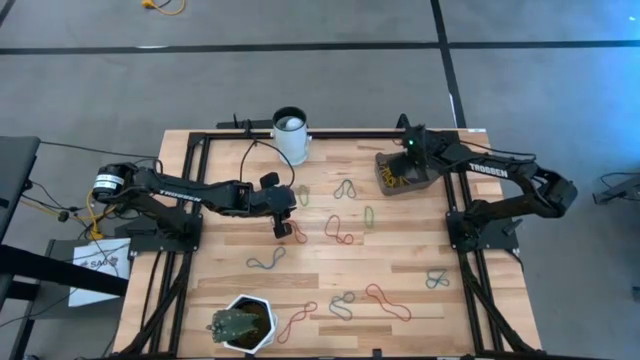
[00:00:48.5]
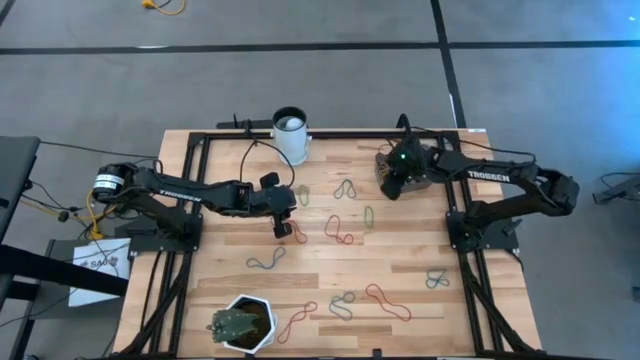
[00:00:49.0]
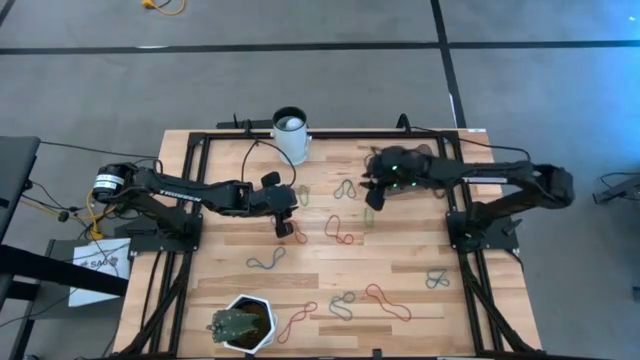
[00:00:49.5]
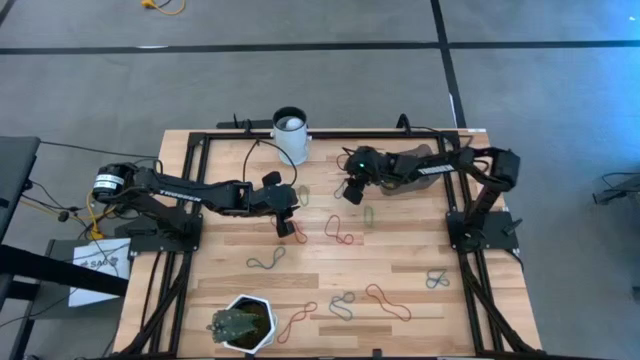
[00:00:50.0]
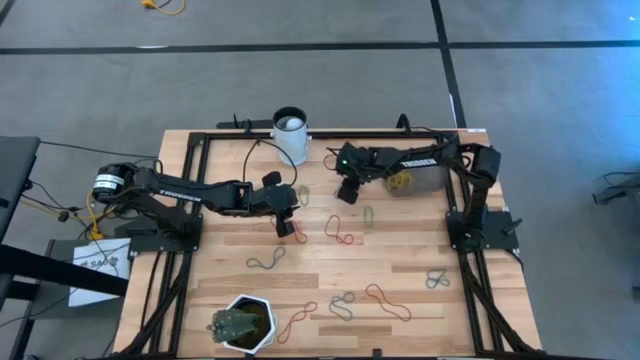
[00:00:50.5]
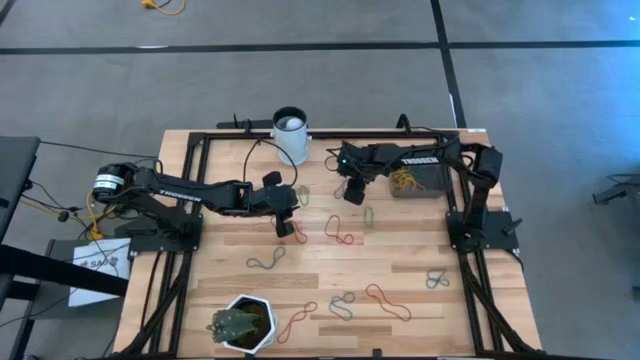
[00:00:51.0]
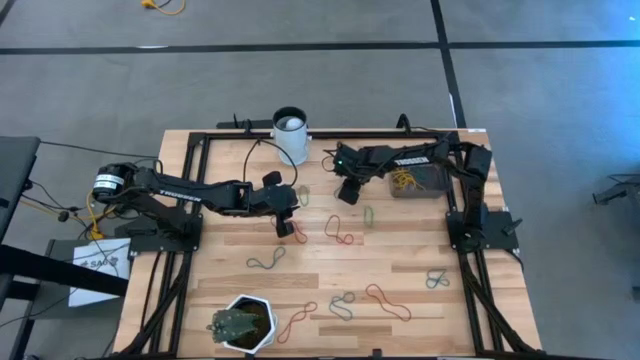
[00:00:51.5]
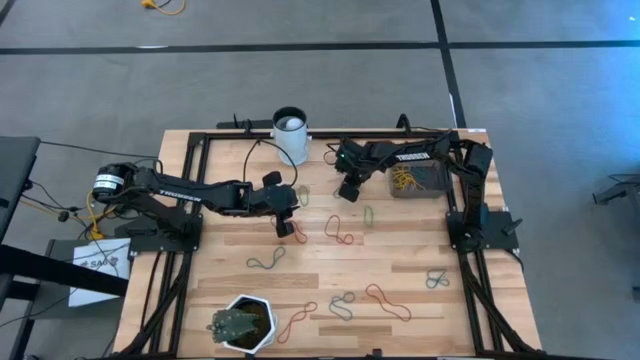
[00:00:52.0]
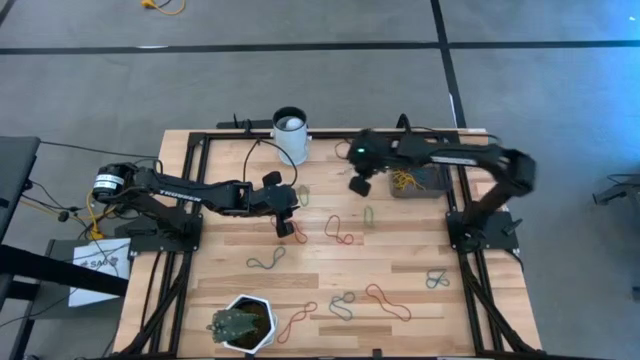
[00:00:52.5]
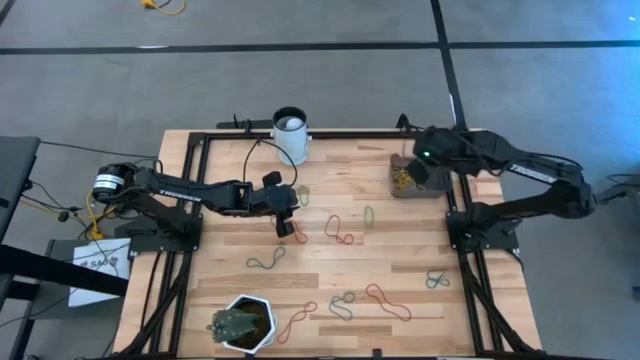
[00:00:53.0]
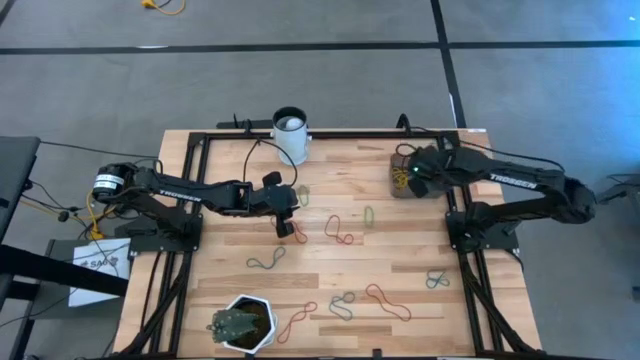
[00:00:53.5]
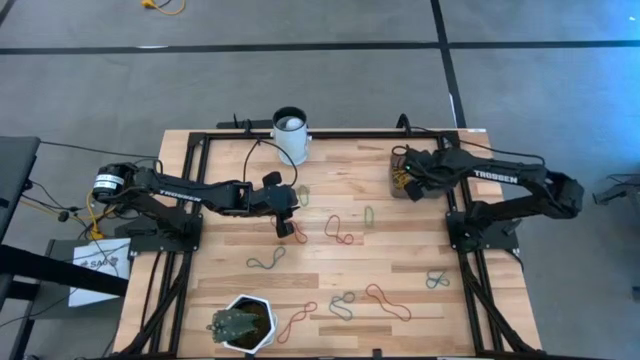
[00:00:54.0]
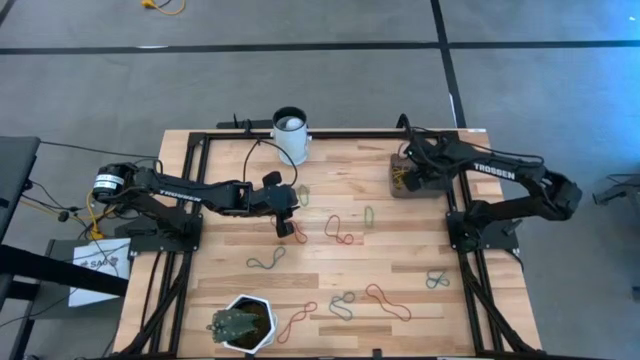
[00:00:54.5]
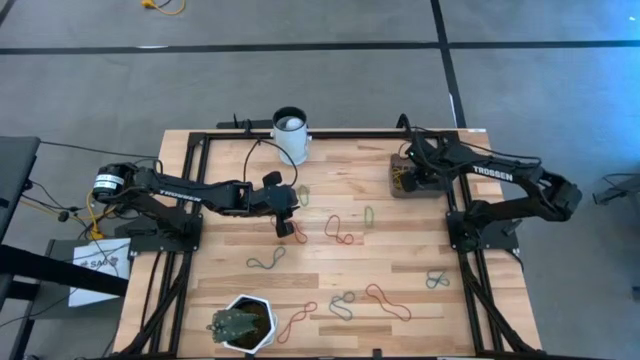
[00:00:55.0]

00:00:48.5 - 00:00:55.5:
Task: Pick and place items into bin
Put the blue rubber band into the bin

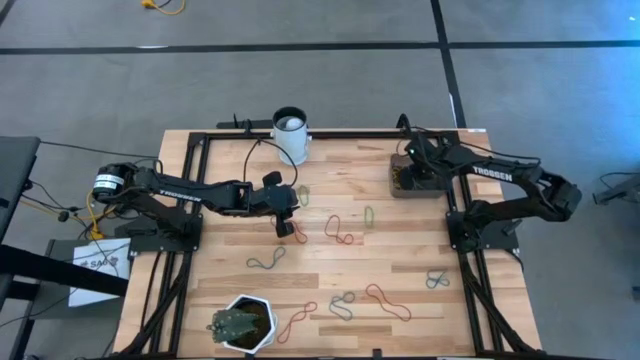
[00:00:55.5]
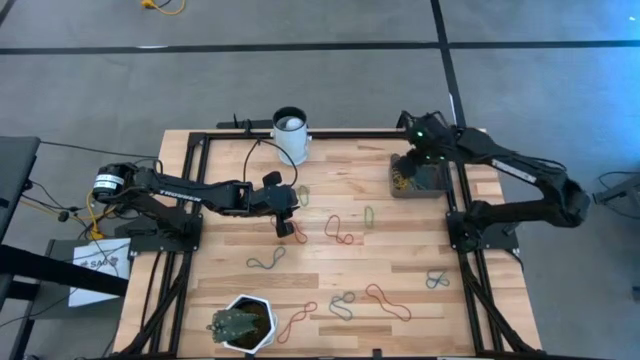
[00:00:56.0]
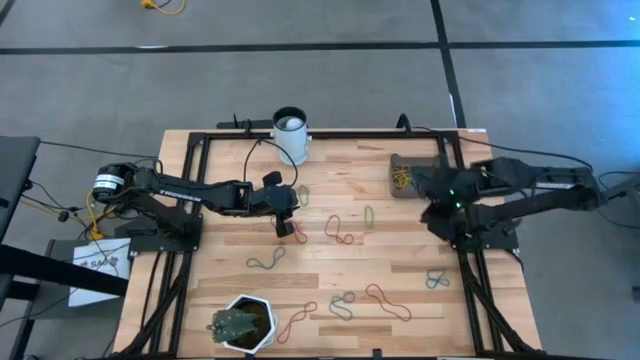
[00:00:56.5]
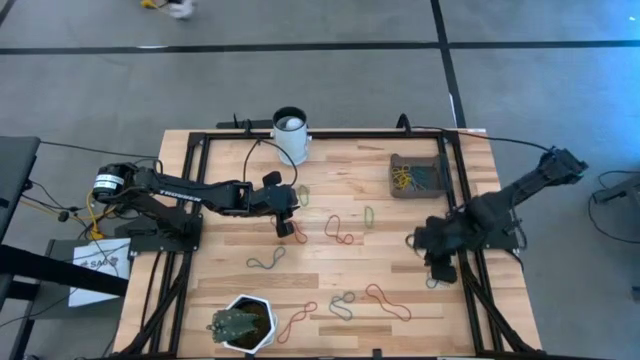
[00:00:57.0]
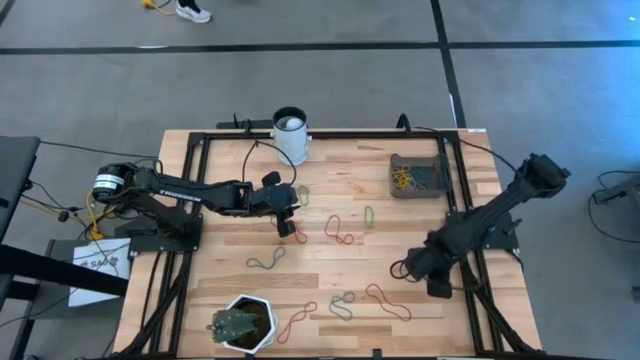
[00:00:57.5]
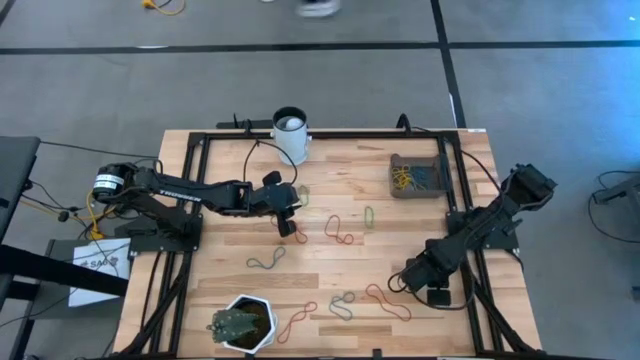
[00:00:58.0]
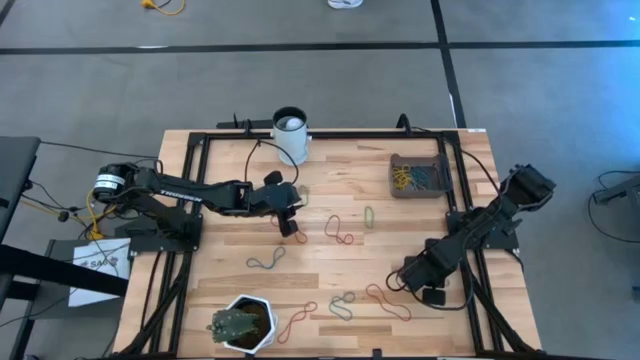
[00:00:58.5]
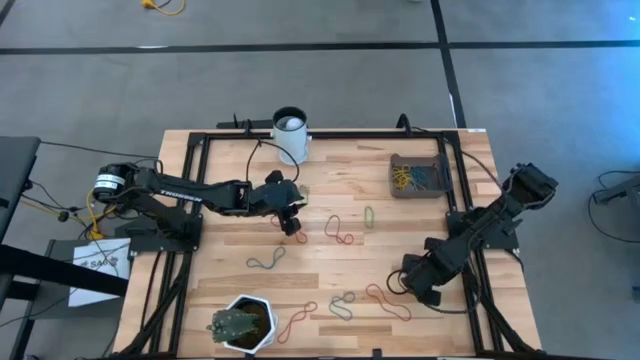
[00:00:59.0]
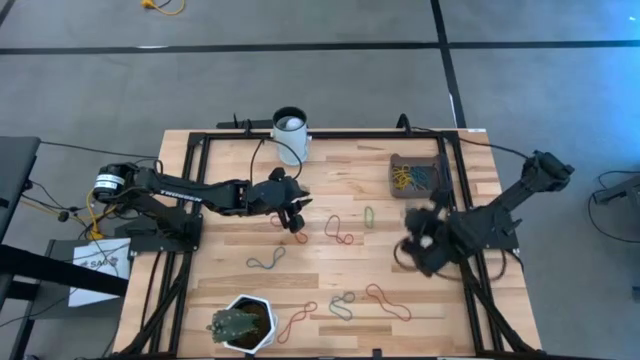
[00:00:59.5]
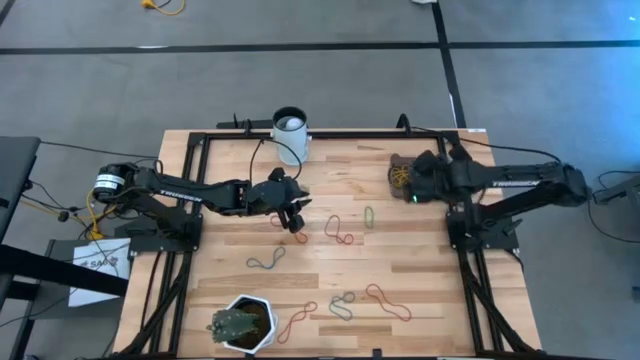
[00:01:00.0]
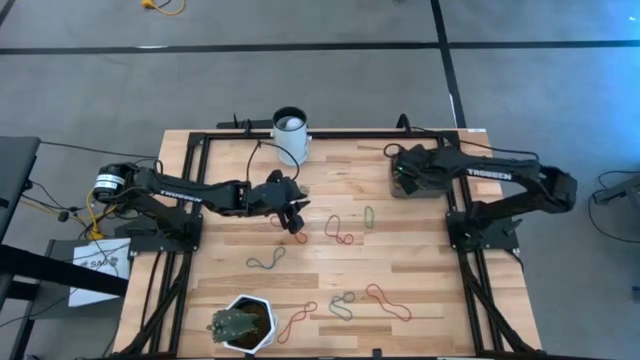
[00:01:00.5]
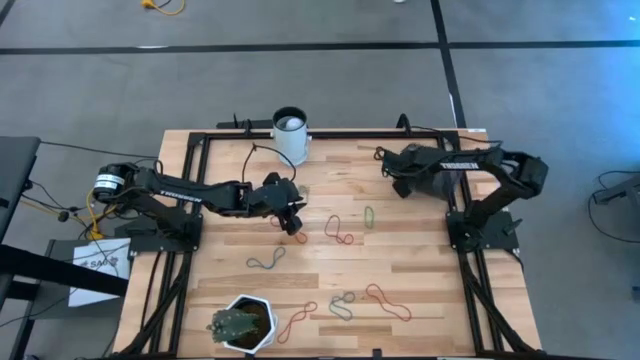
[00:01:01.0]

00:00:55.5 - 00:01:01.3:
Put the right blue rubber band into the bin

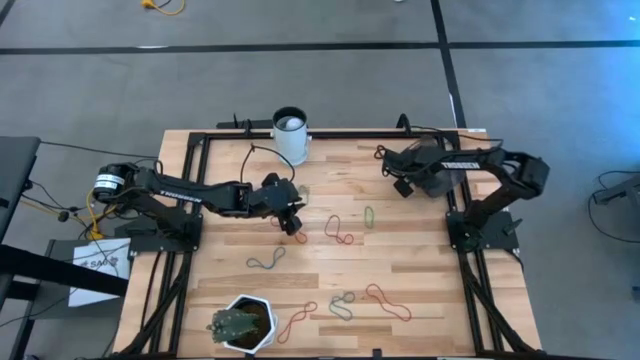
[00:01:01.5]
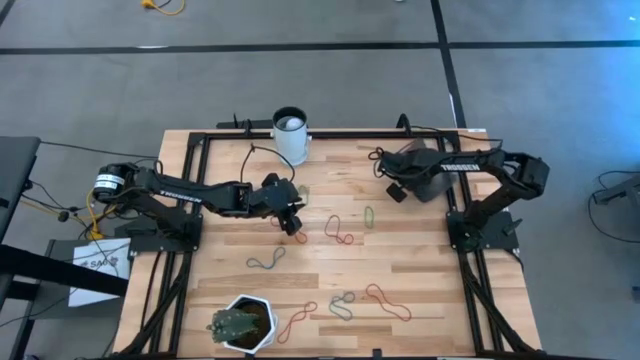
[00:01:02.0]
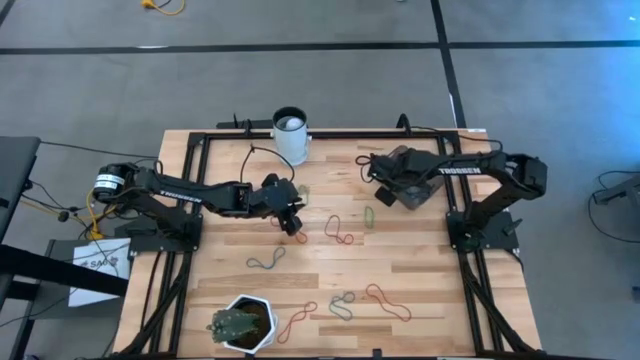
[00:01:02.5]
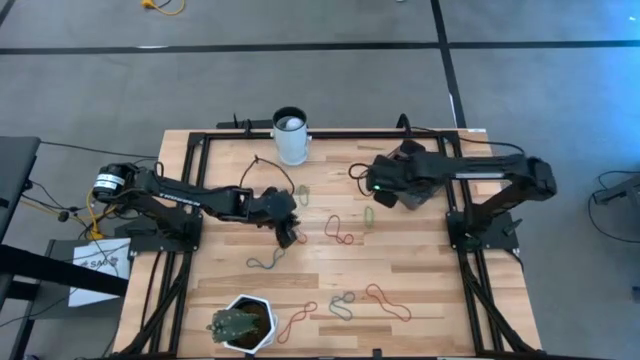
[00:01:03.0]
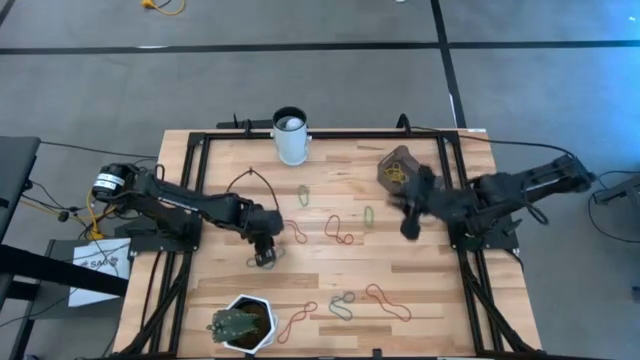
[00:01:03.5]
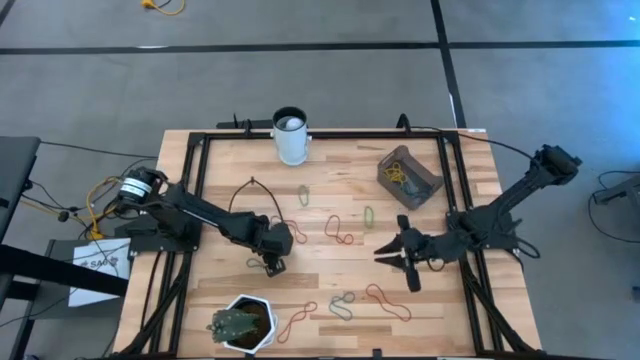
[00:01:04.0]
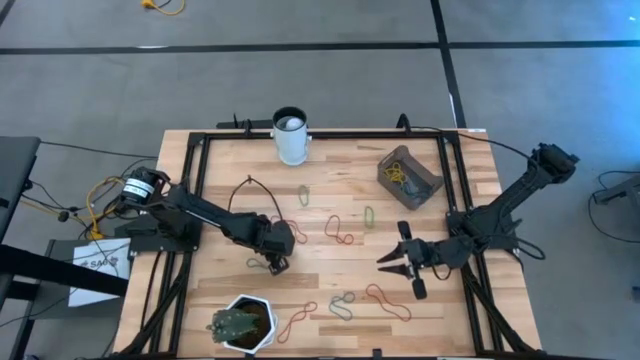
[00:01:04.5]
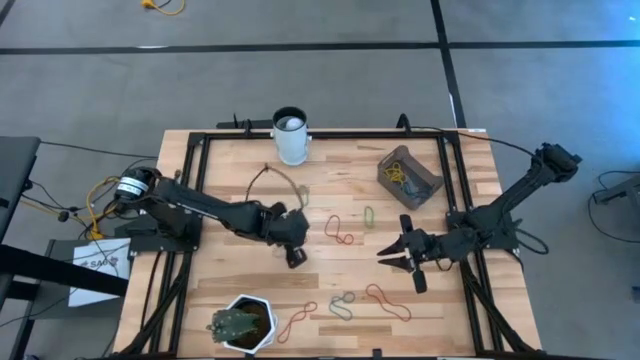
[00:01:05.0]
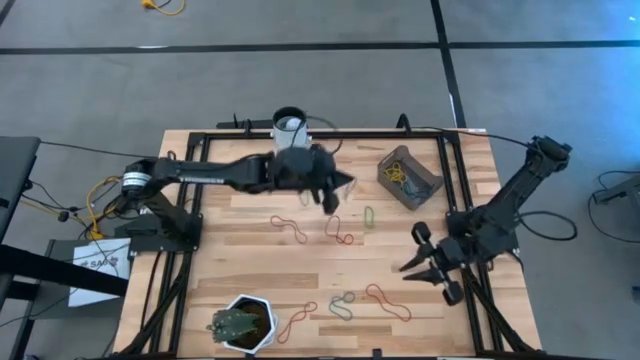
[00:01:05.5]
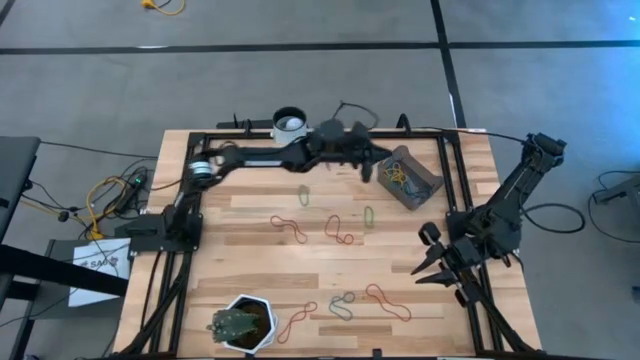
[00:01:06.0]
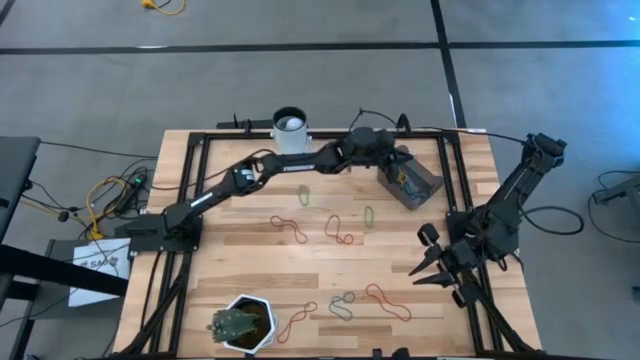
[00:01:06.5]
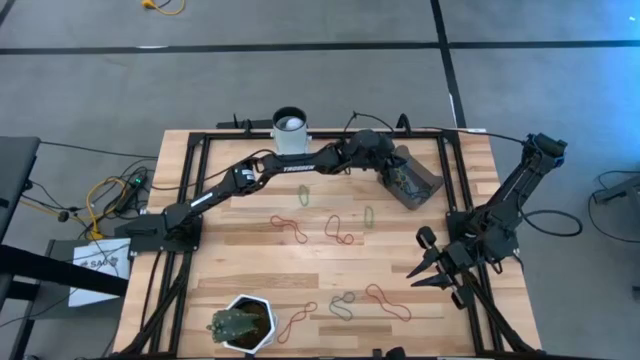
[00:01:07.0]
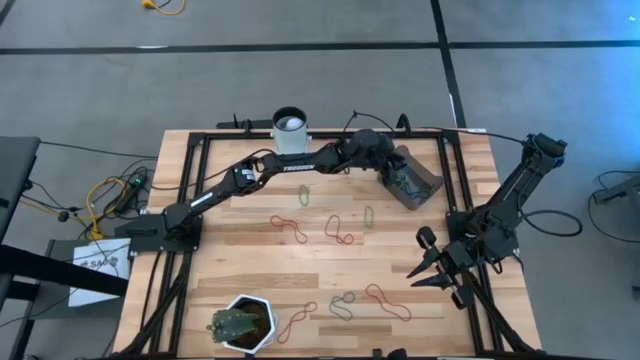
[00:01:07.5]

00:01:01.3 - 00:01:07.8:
Put the left blue rubber band into the bin

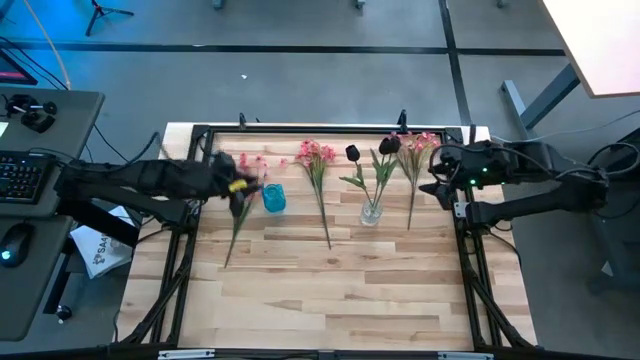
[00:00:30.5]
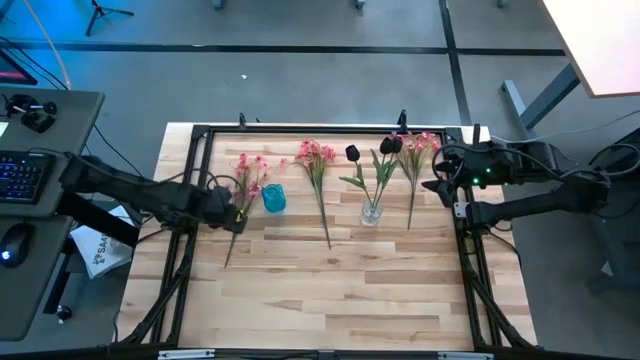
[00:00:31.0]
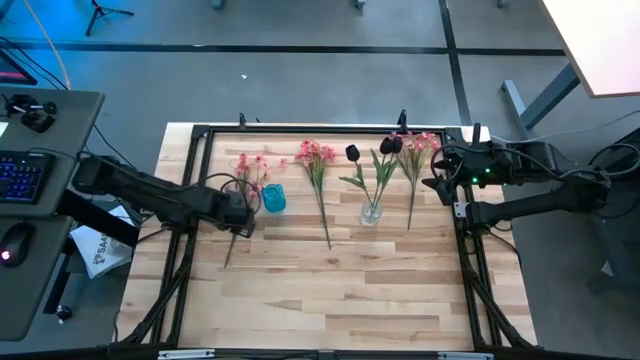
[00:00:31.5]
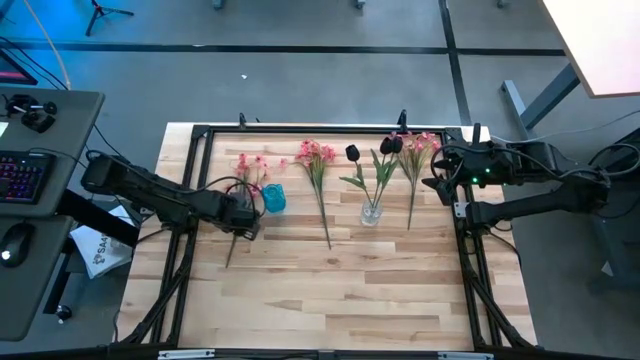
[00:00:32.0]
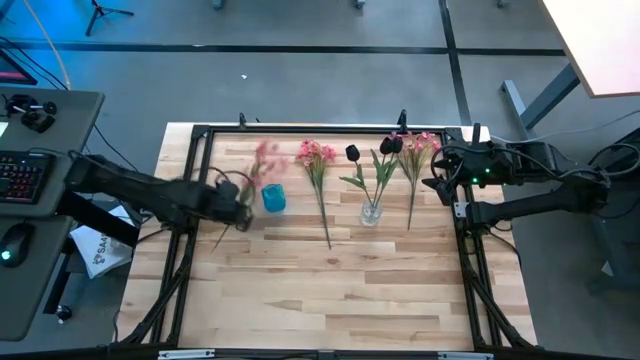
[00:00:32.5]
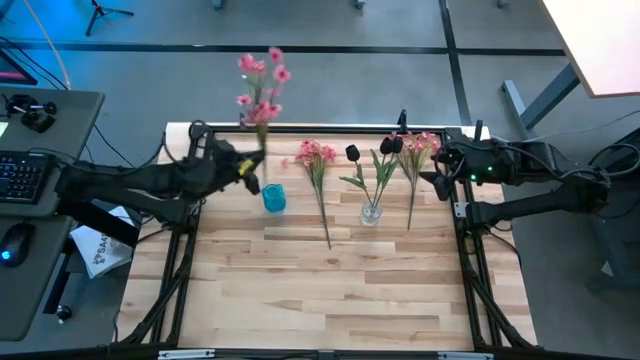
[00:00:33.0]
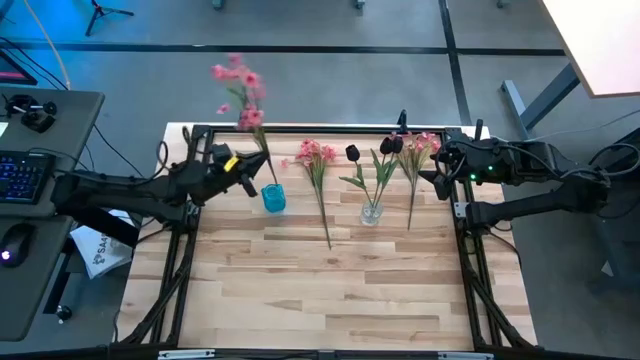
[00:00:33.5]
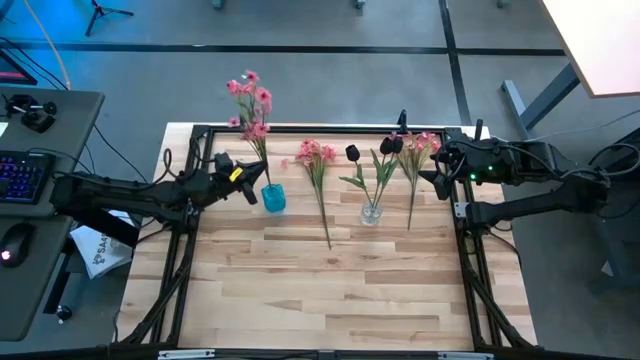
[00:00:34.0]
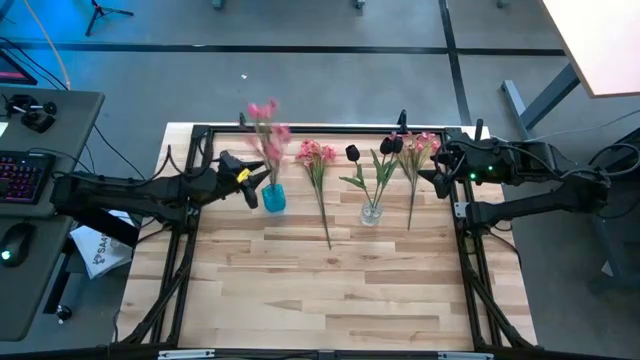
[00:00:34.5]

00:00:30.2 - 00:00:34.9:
Task: Sort flowers into vase by color
Put the left pink flowers into the blue flower vase
